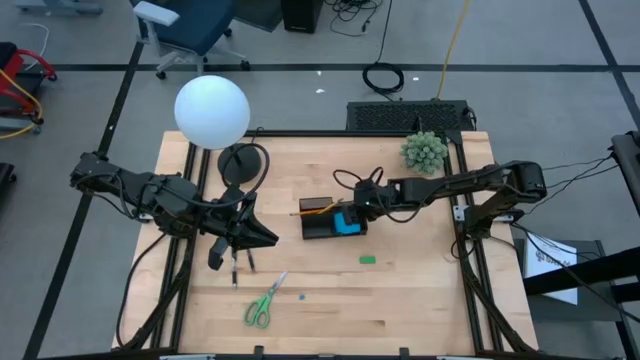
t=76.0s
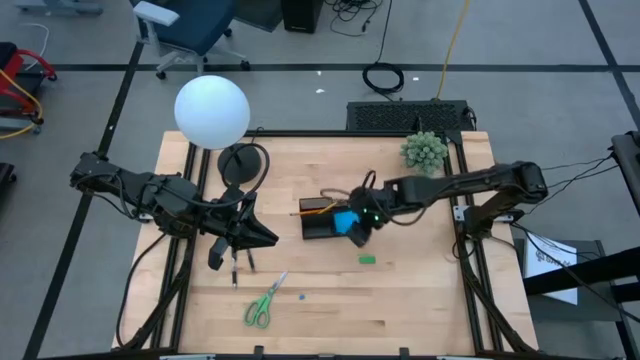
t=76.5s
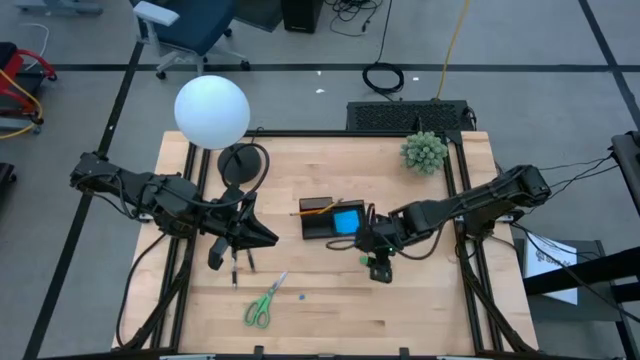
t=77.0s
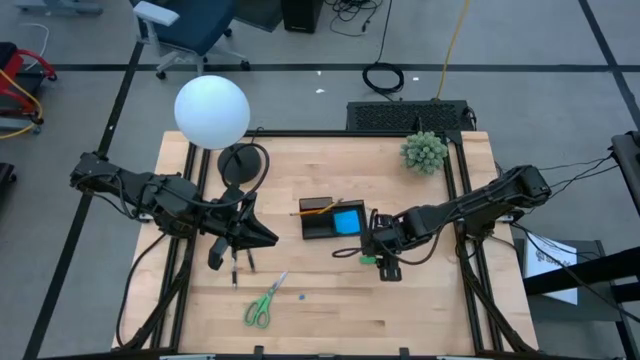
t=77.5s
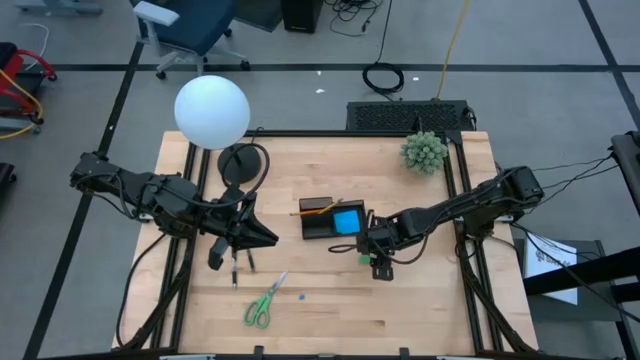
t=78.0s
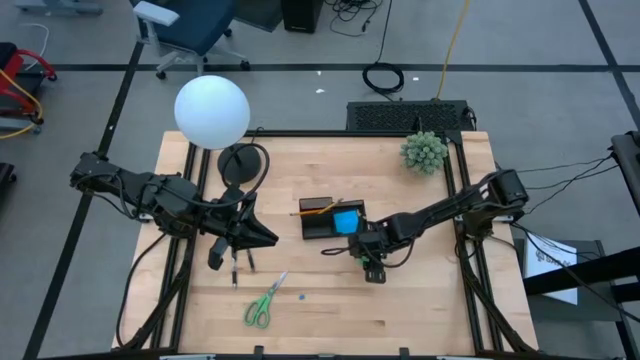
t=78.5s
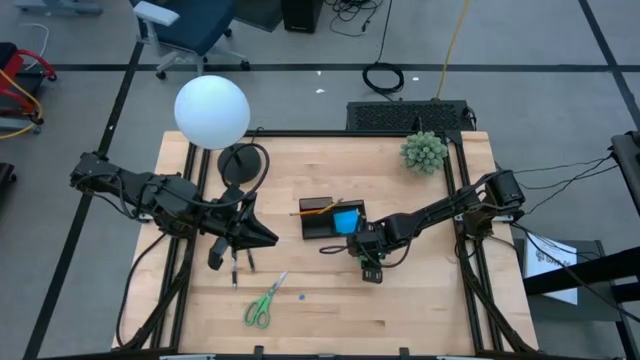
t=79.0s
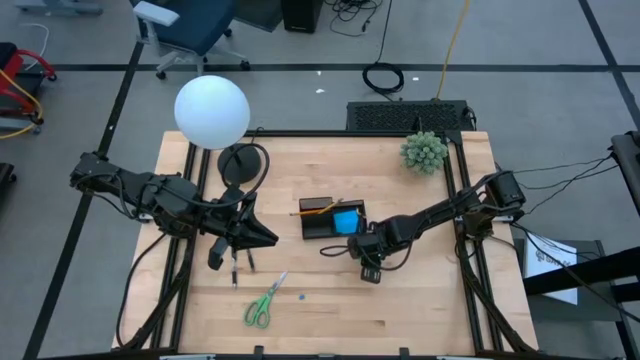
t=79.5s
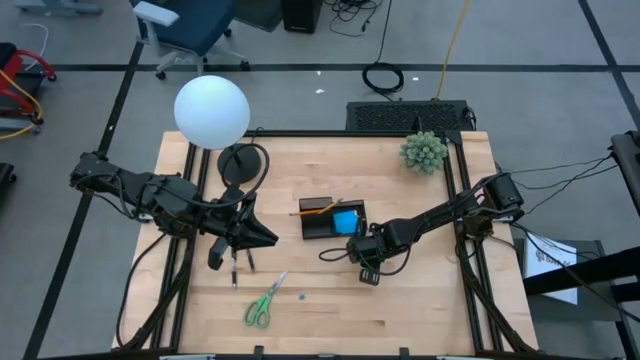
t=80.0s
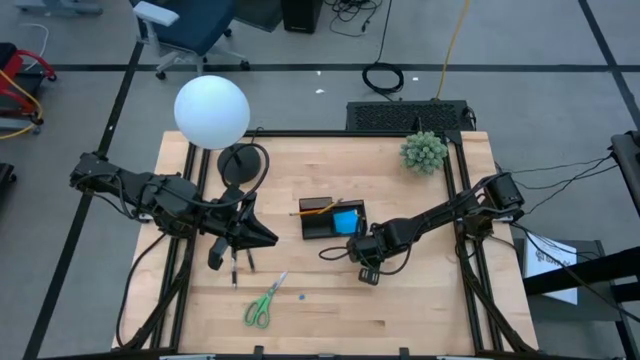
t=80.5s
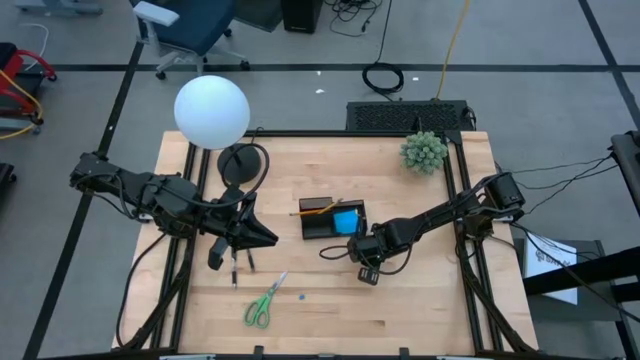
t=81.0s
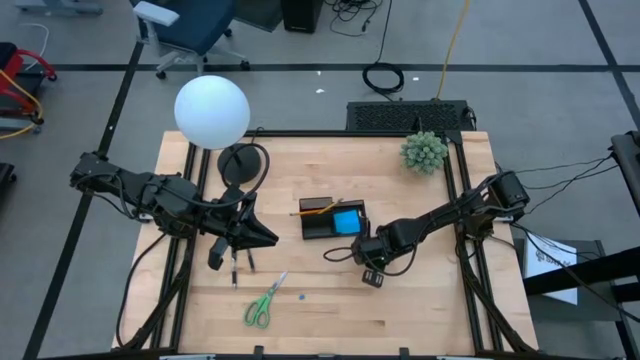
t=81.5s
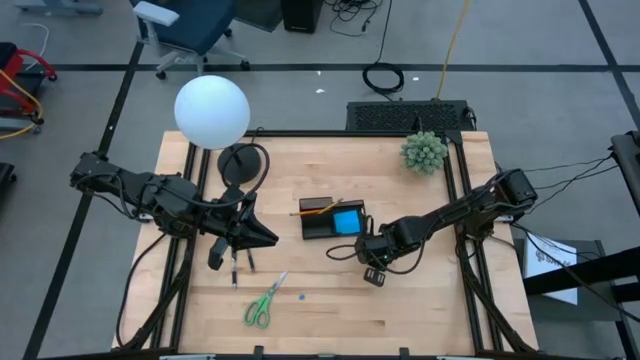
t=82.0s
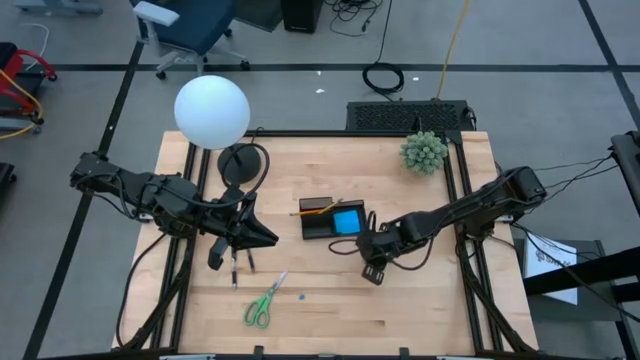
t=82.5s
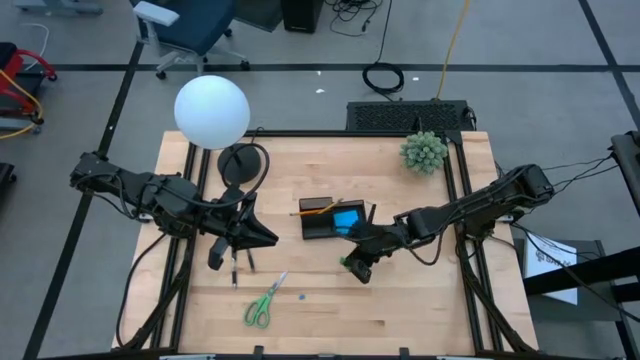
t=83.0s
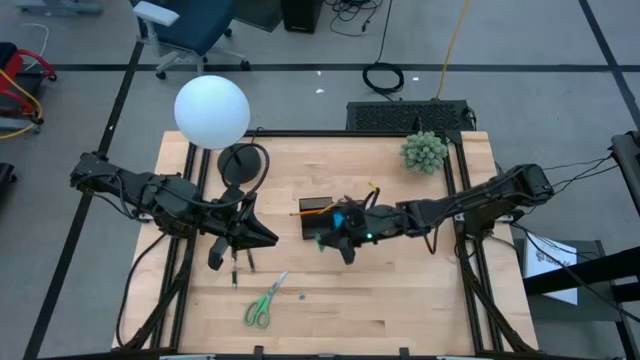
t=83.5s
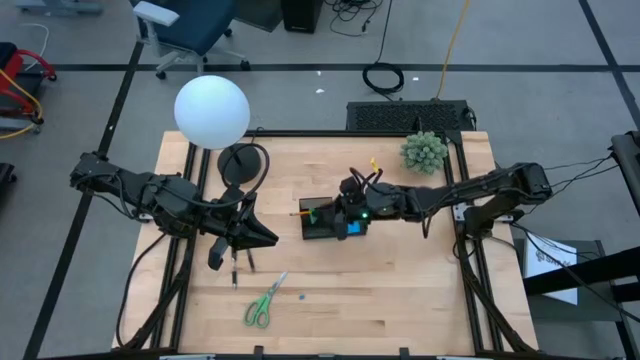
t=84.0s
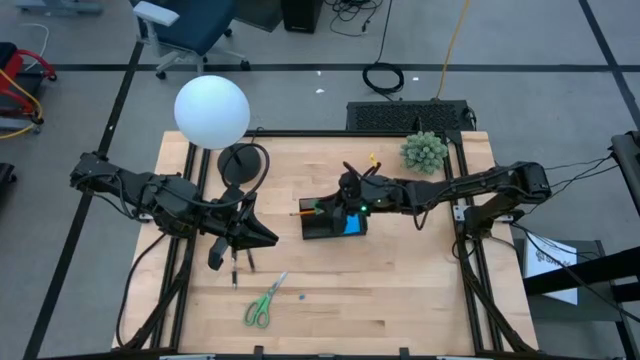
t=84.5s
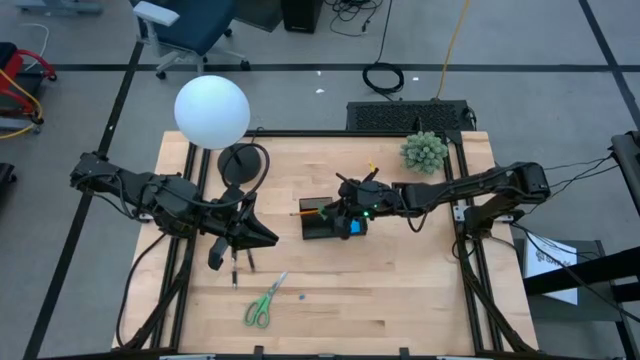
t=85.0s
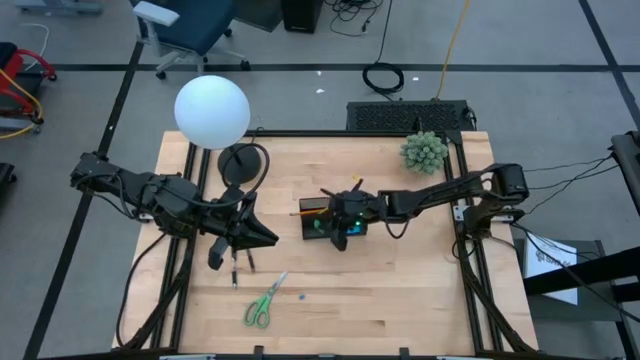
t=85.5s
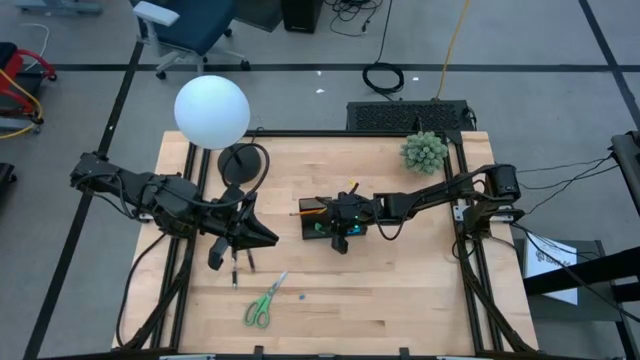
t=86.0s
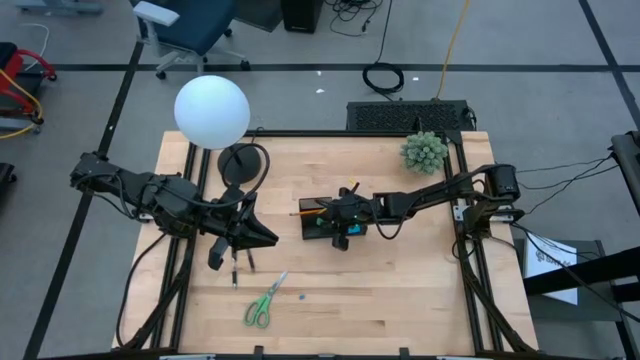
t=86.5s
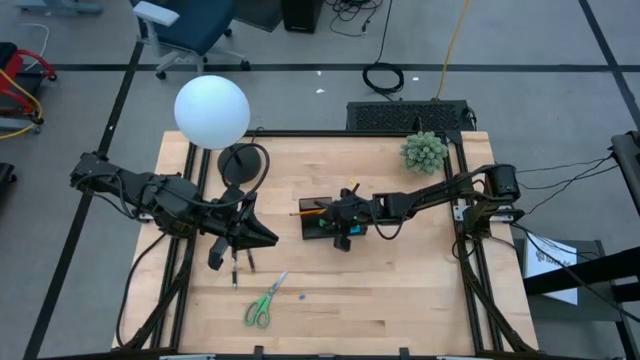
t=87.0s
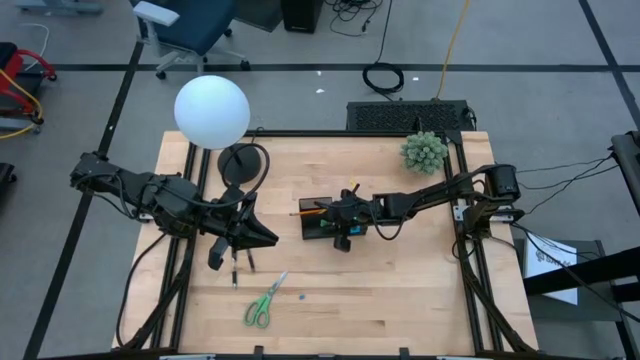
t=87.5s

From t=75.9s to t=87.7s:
Task: Pick and place office supplies into organizer
Put the green eraser into the desk organizer

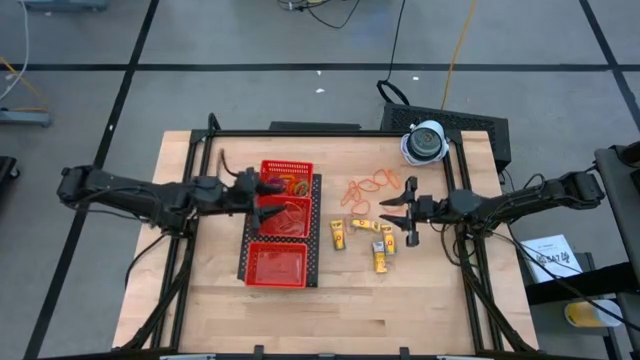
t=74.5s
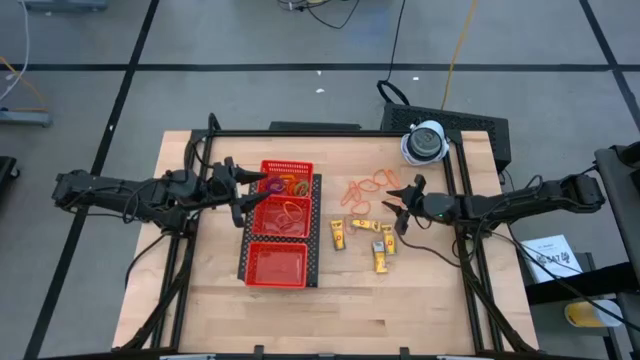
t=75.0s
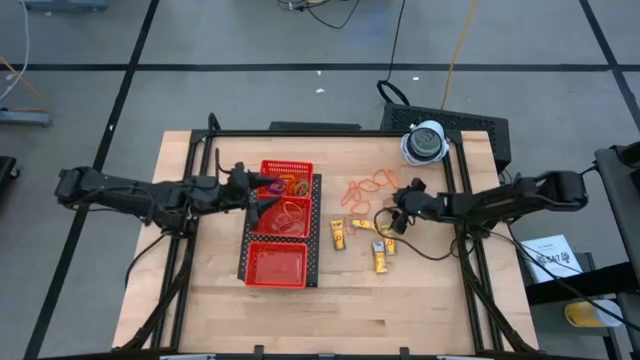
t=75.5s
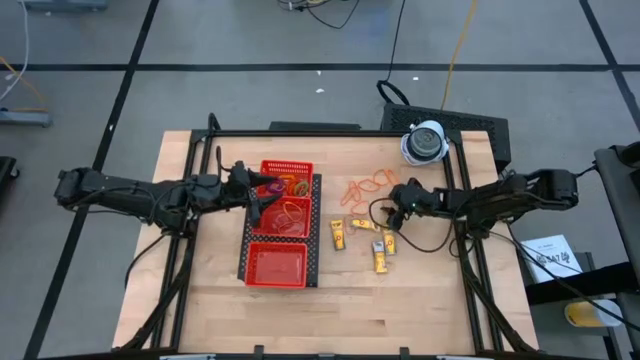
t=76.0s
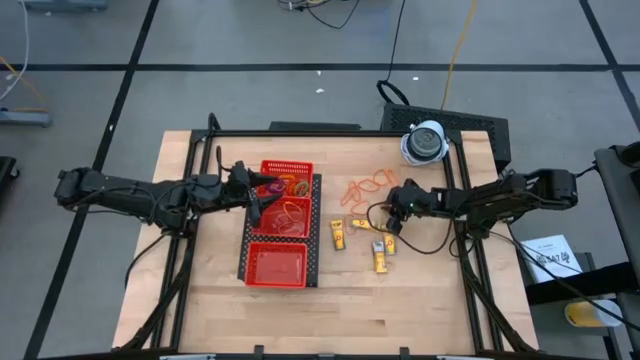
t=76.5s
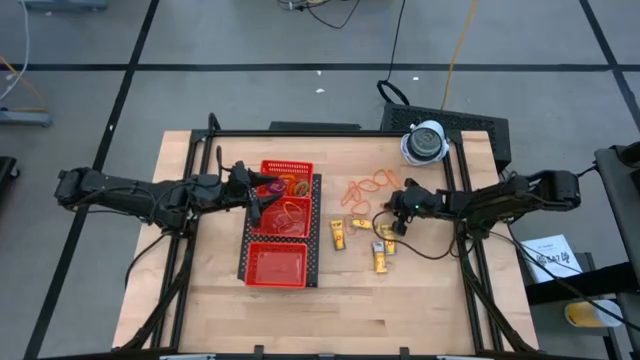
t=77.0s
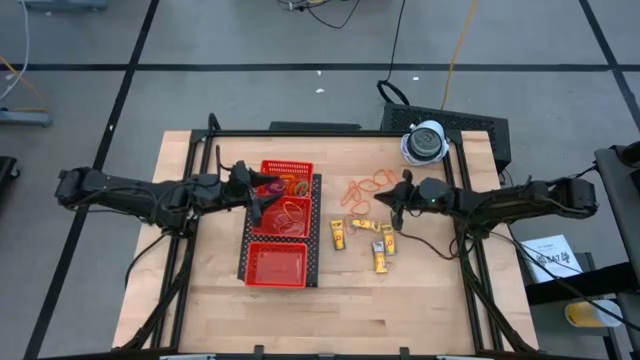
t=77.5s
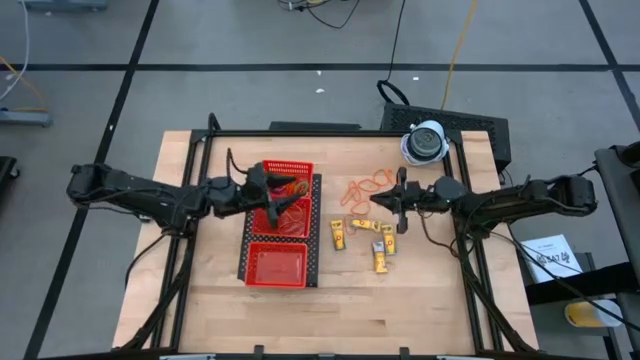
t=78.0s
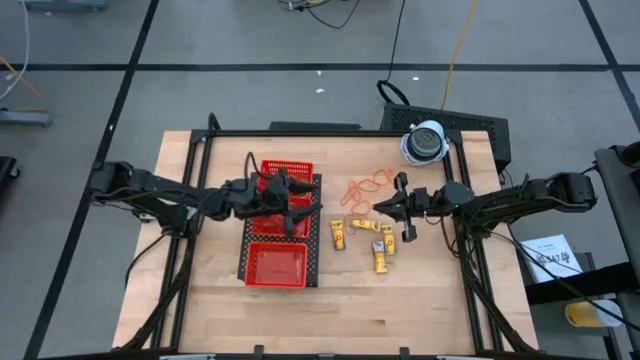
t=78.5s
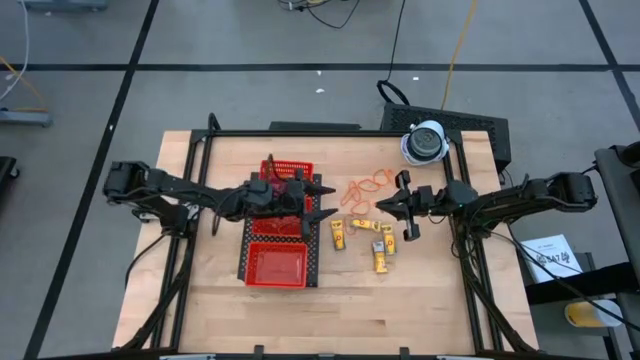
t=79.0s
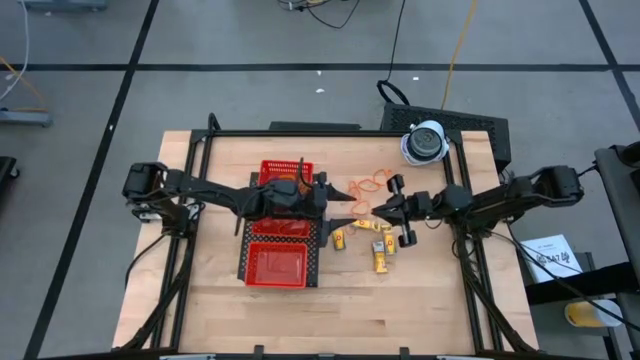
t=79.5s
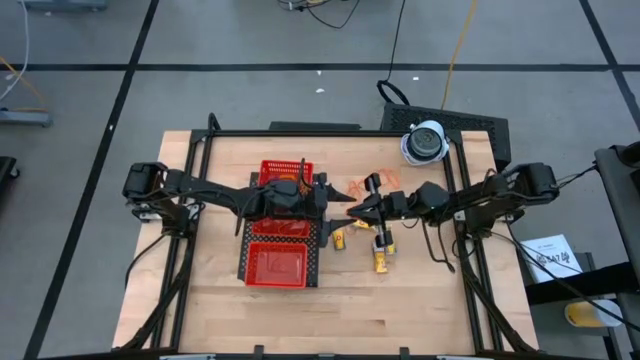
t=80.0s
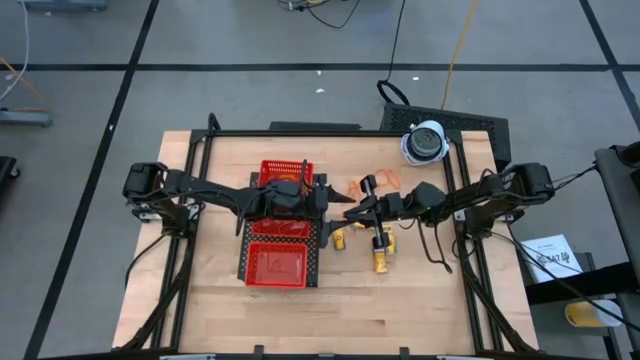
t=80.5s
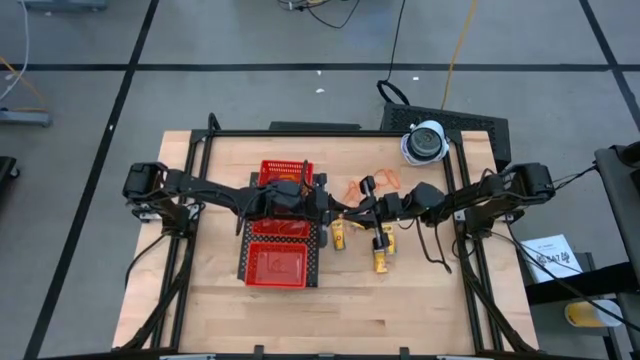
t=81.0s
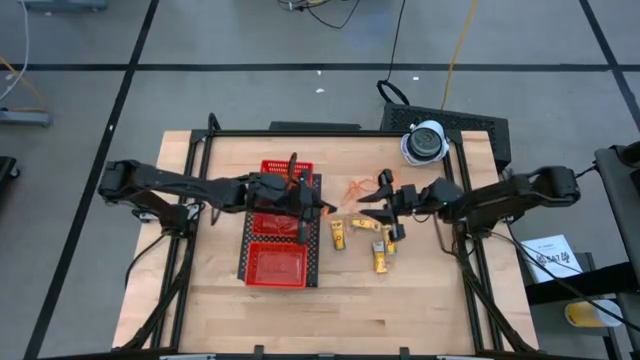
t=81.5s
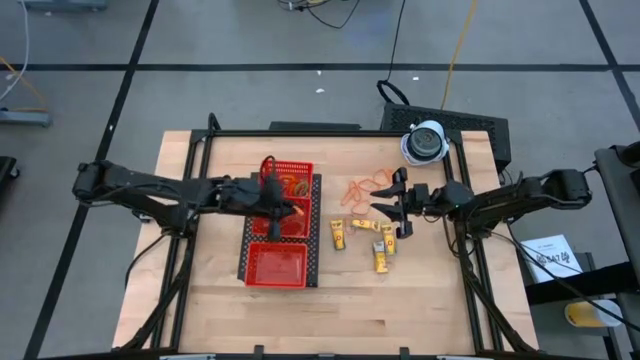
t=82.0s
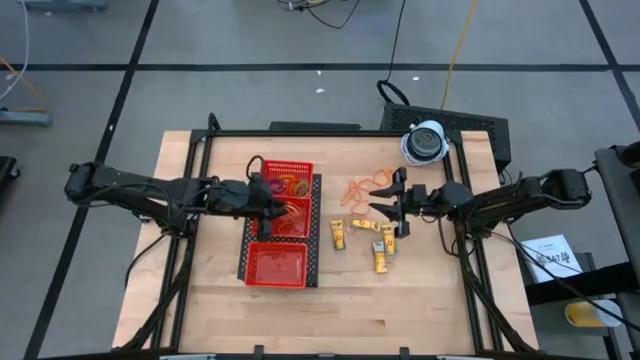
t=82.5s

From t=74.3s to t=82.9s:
Task: Pick & Place Office Desk Supplies
Put the orange rubber band into the middle red basket on the shelf

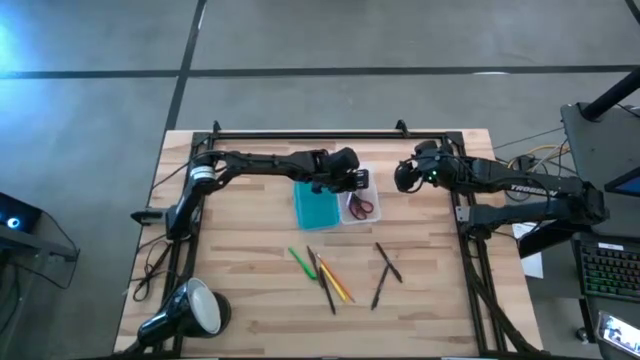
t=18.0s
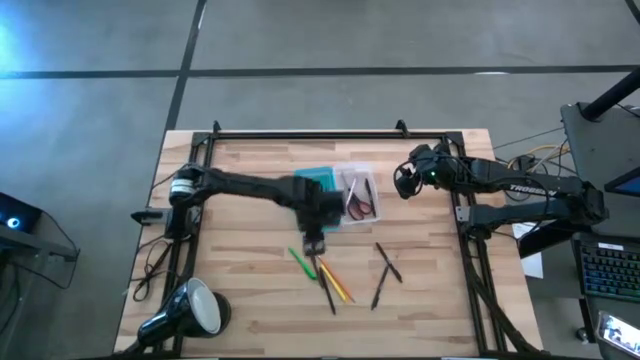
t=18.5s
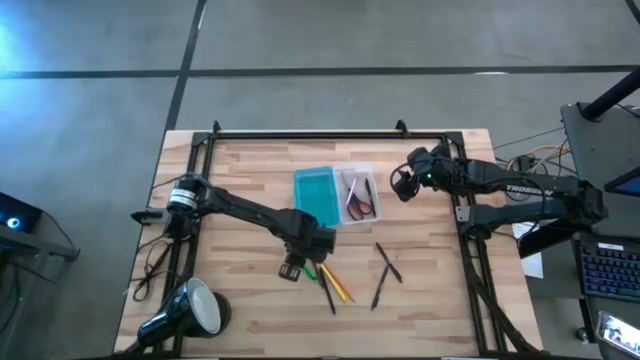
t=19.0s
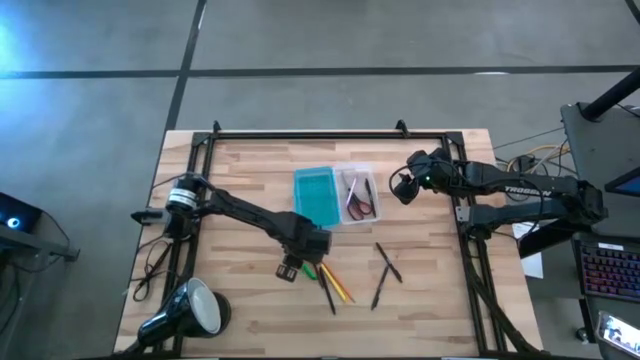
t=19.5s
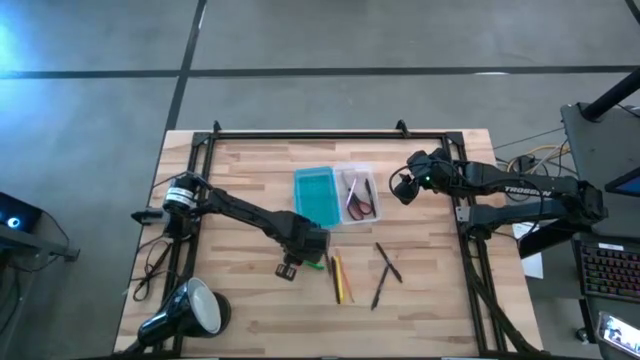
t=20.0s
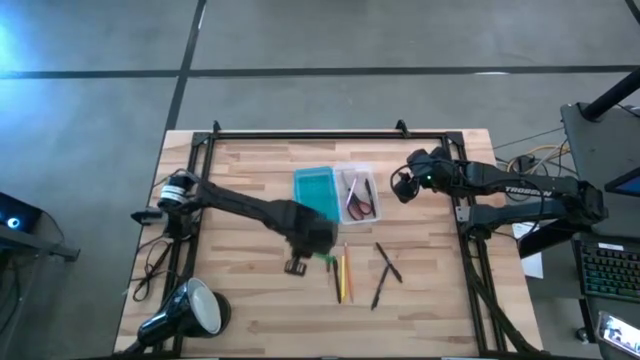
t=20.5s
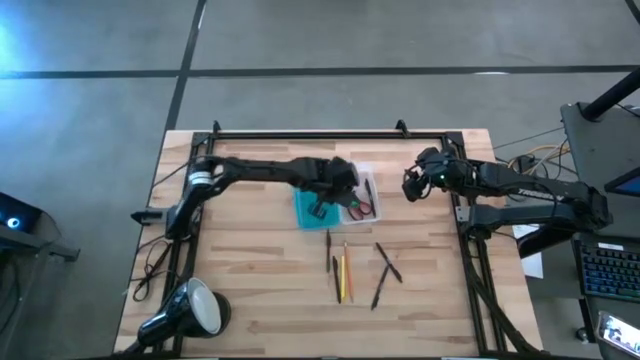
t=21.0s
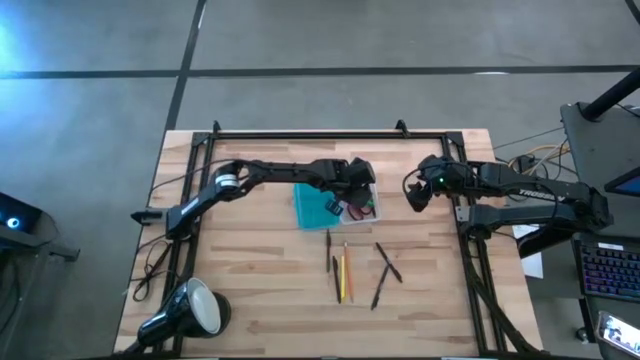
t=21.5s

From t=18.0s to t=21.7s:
Task: Pick & place school supplies into a supply box
Put the green pen into the blue supply box
